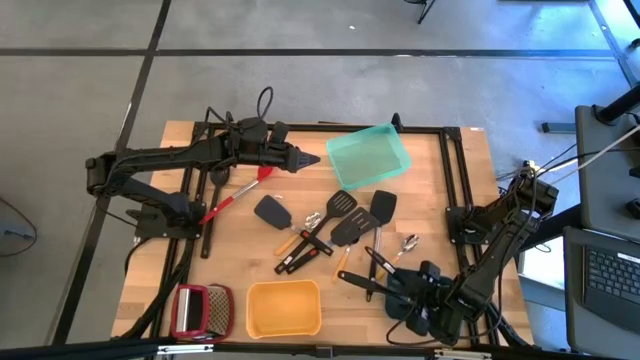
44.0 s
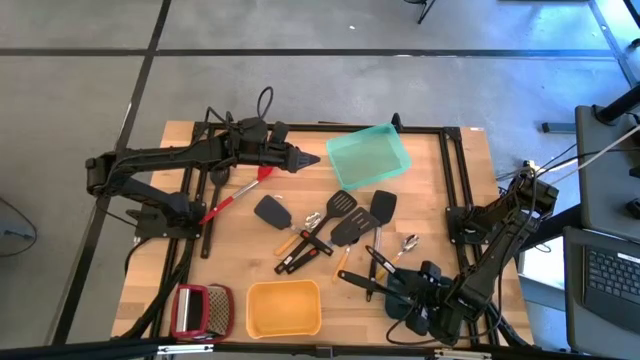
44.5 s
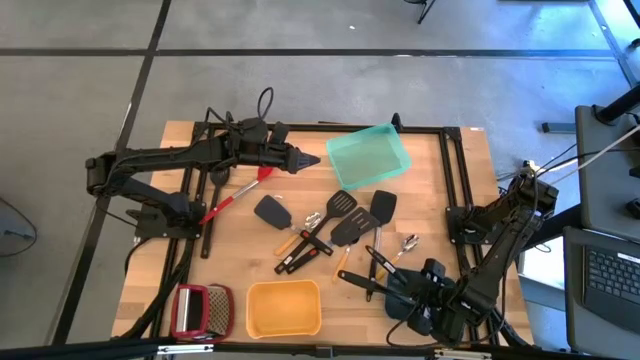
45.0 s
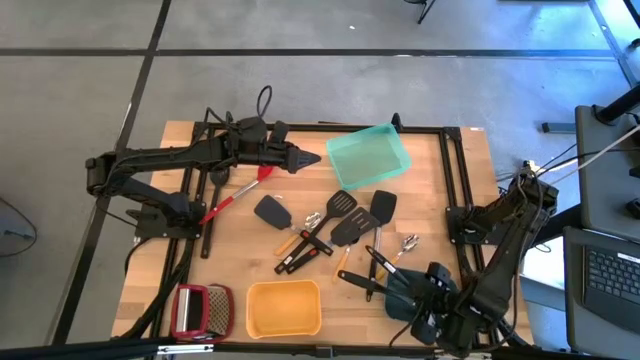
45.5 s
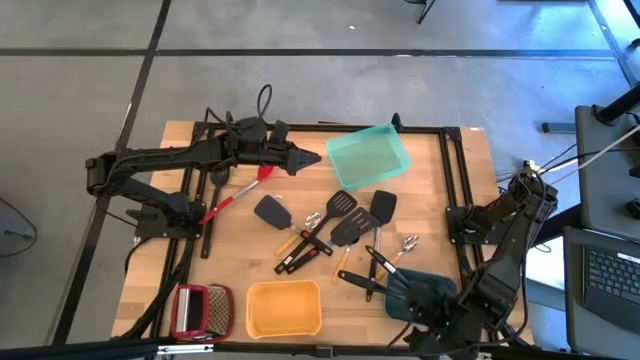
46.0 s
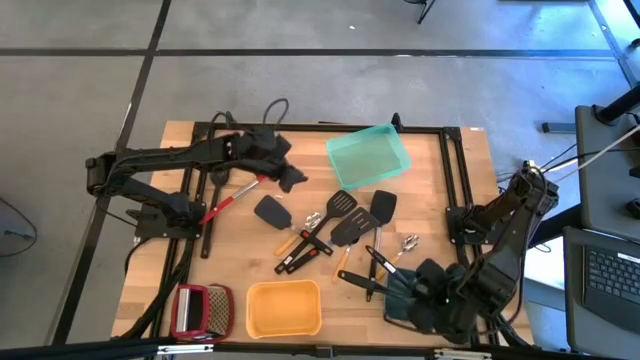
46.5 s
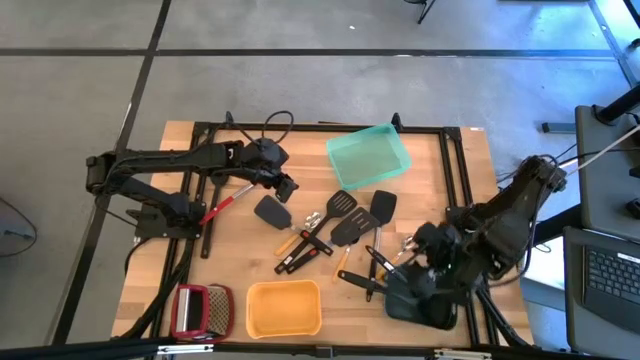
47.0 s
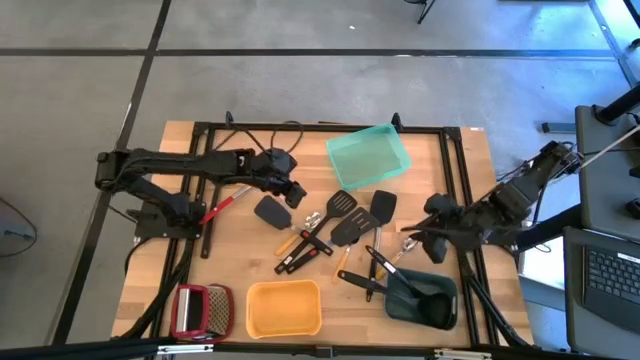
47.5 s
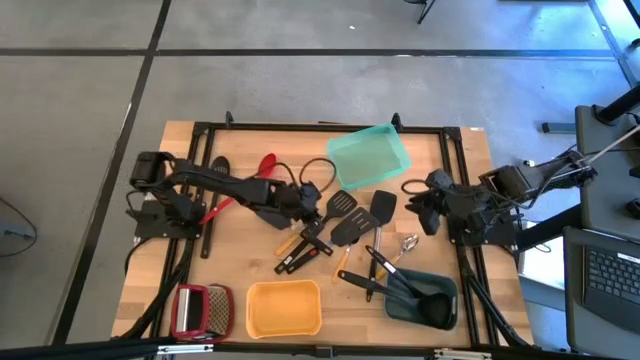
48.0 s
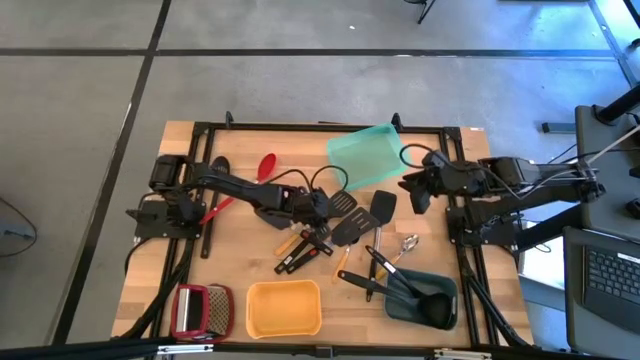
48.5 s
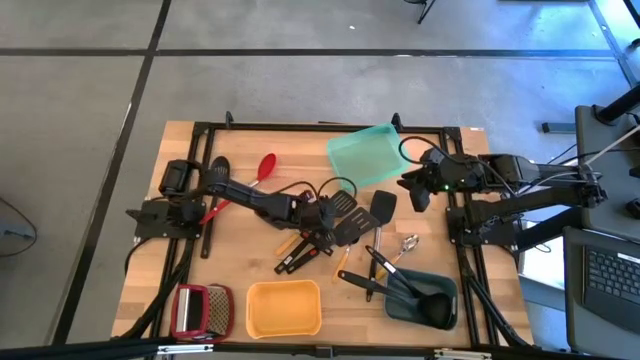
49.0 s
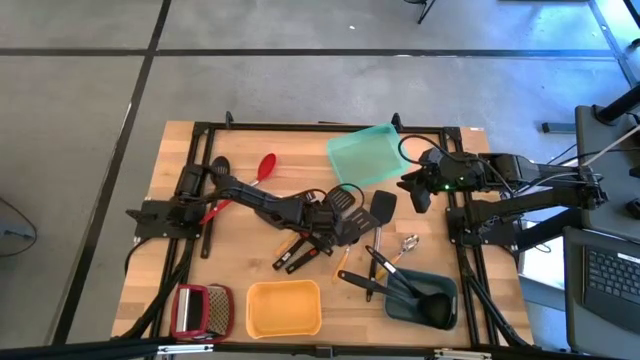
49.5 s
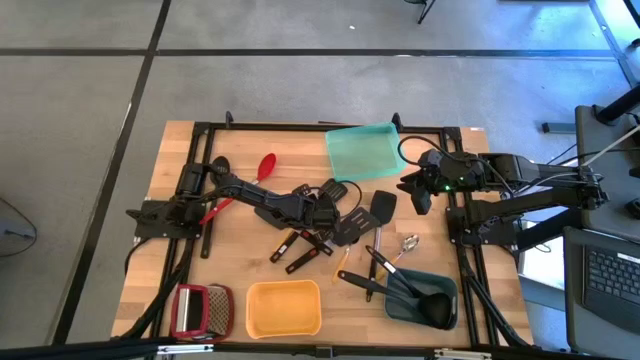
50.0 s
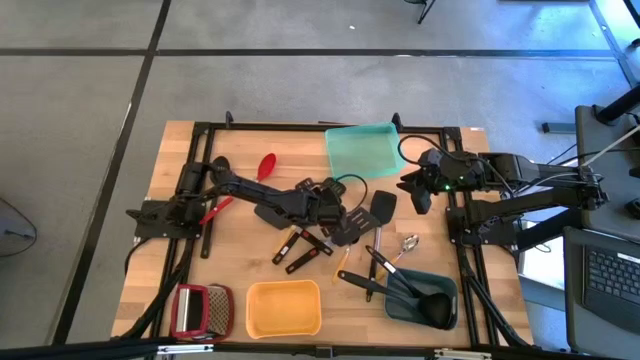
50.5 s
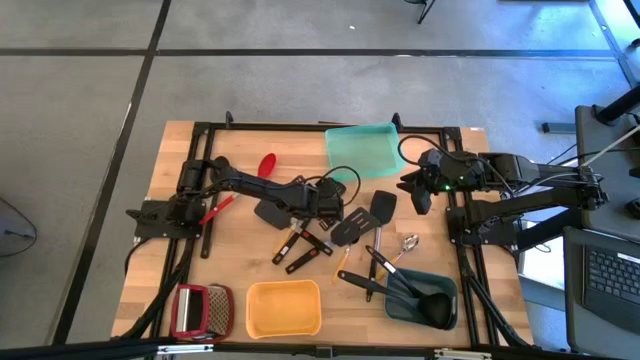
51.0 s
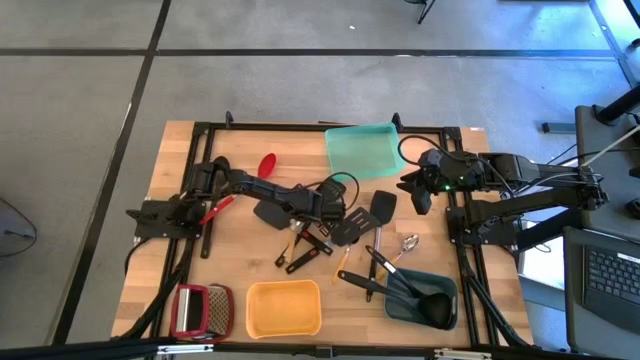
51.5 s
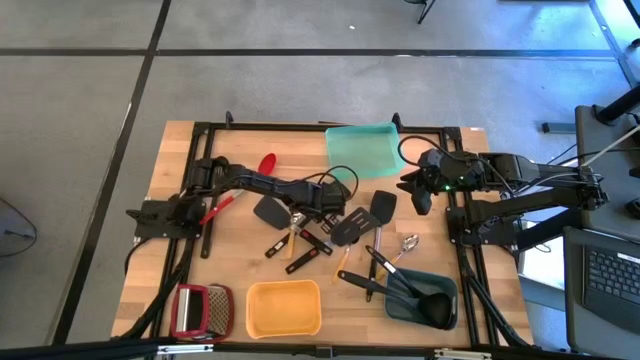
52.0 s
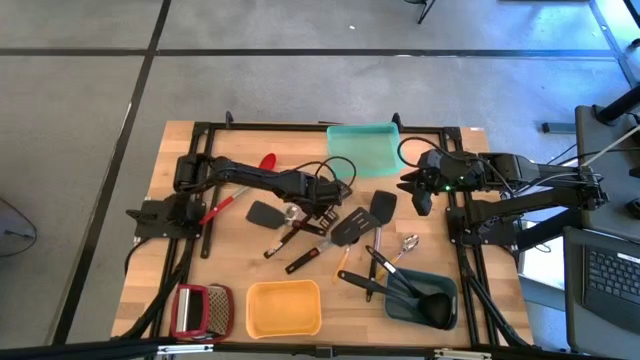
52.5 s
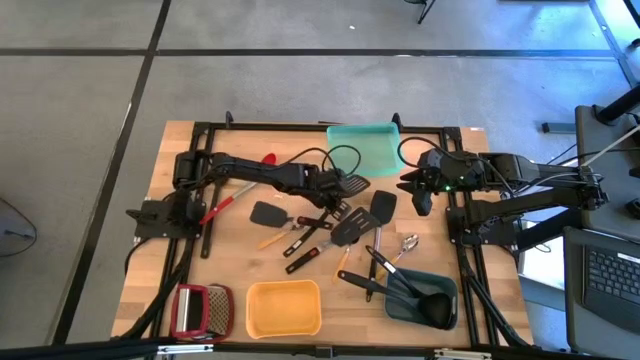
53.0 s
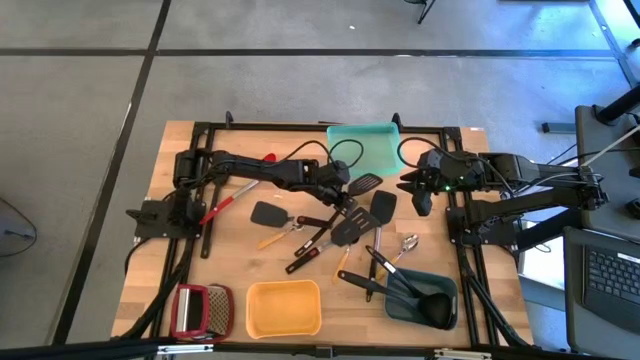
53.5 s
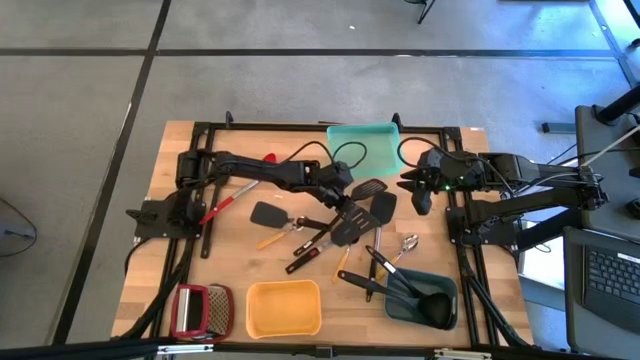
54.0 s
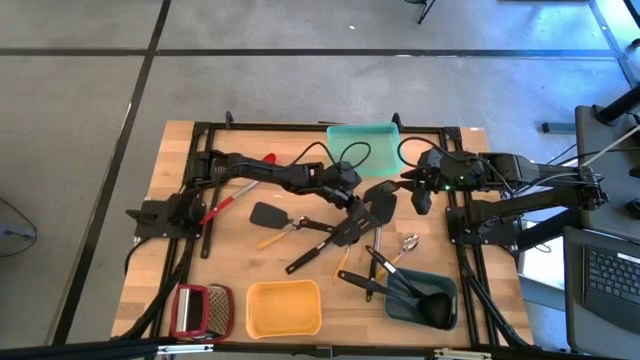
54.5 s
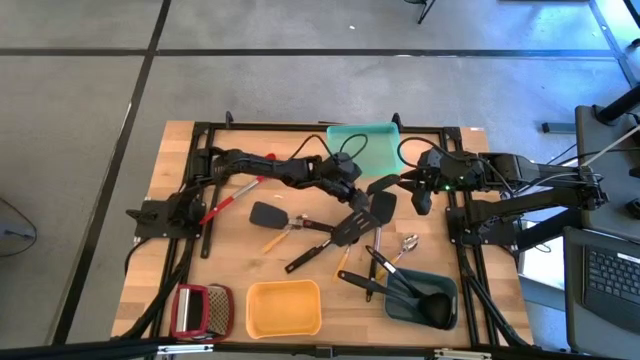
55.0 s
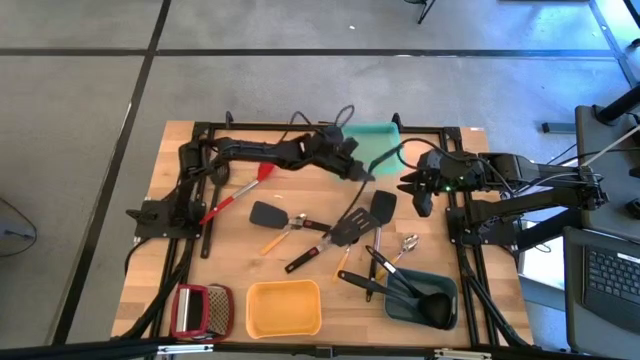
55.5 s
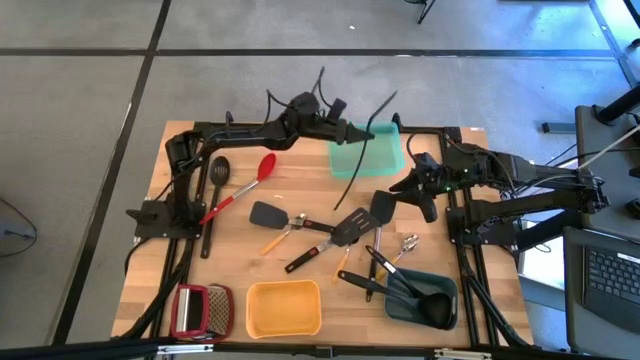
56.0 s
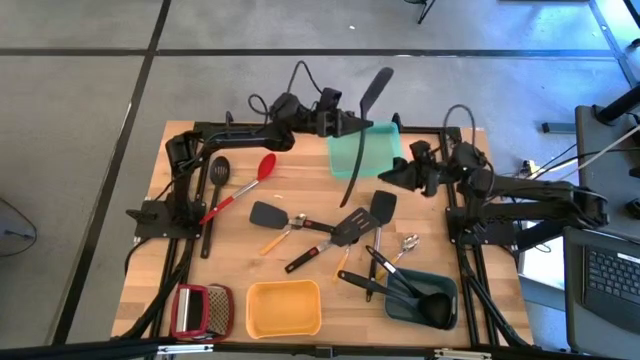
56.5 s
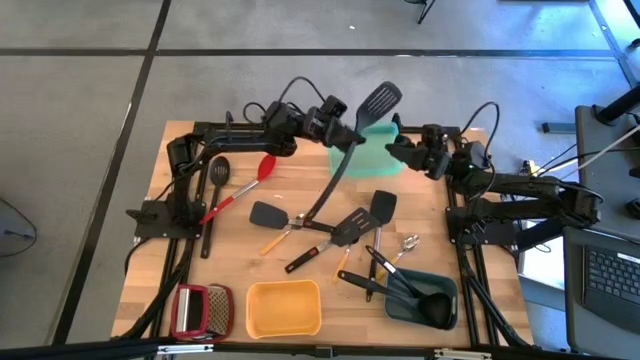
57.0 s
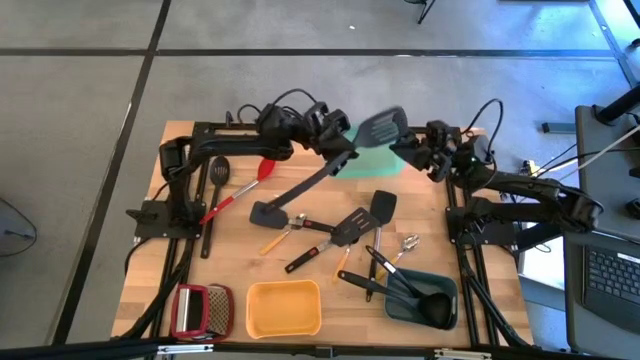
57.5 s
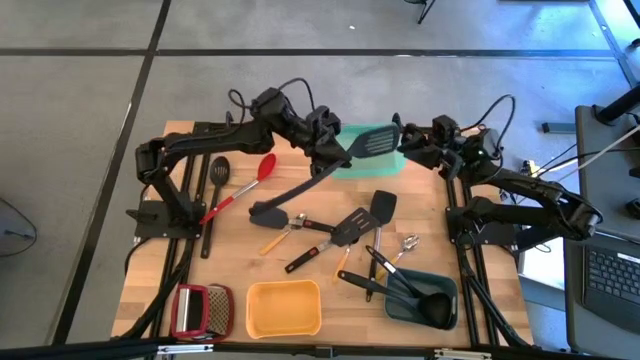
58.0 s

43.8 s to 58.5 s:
Task: Pick & Place Kitchen Items
Put the black spatula into the green bin

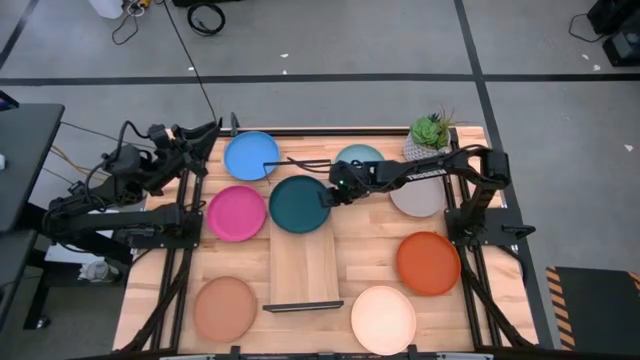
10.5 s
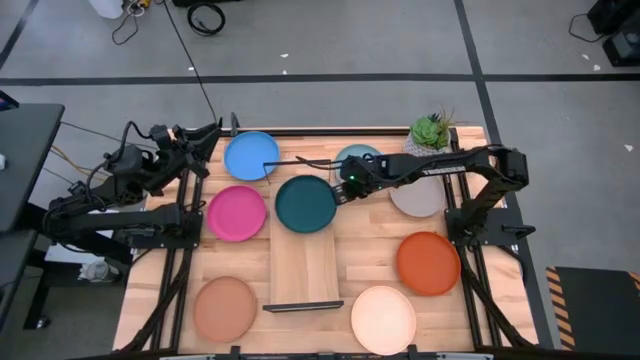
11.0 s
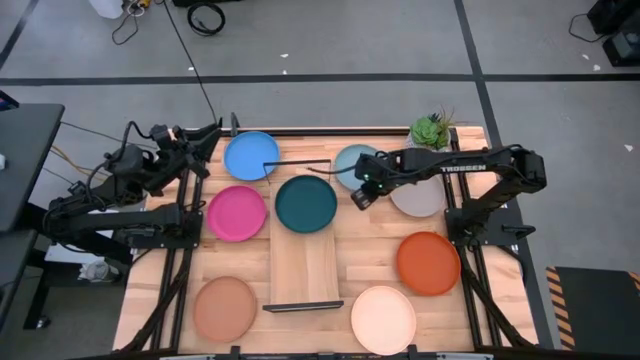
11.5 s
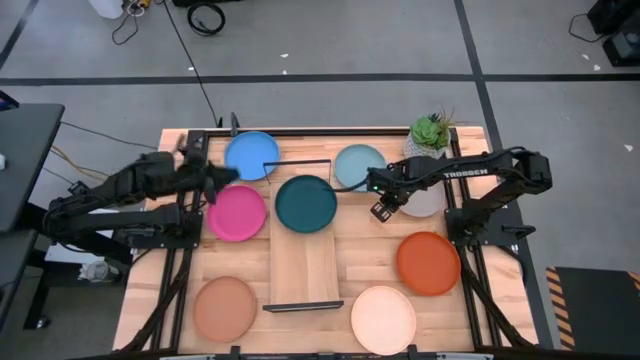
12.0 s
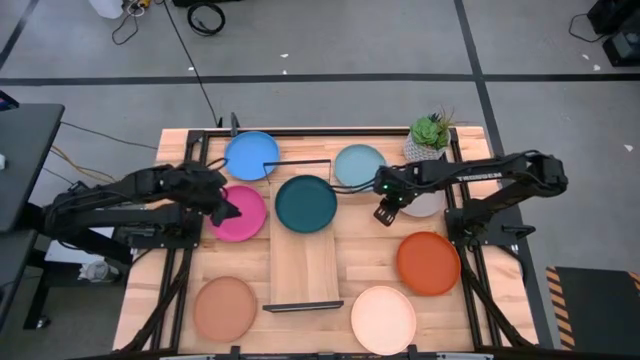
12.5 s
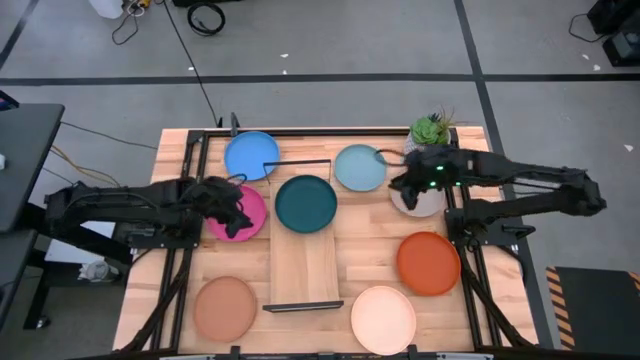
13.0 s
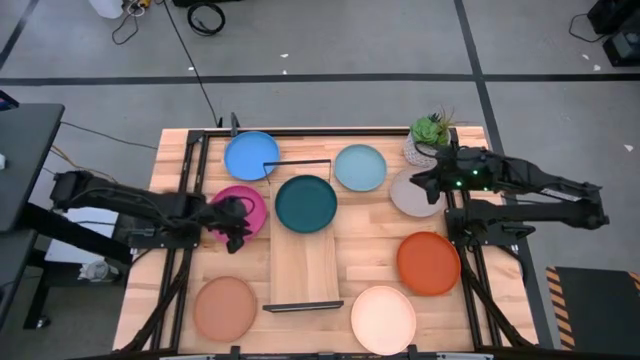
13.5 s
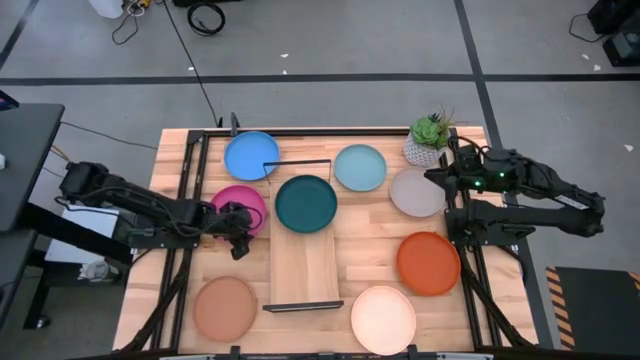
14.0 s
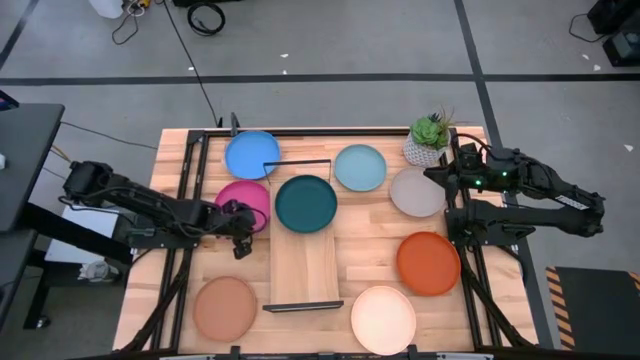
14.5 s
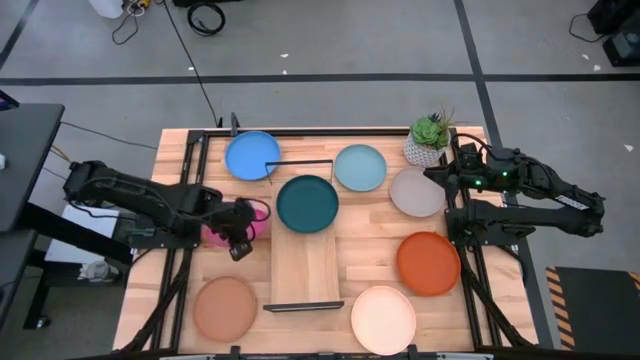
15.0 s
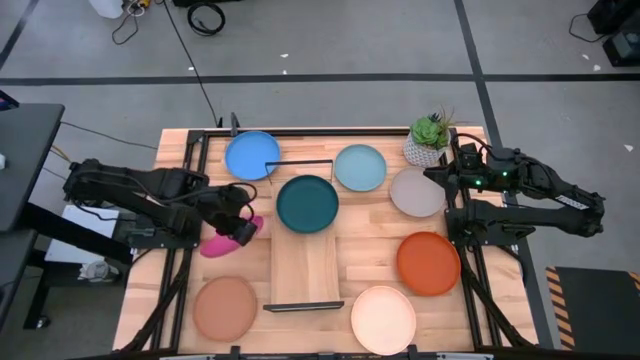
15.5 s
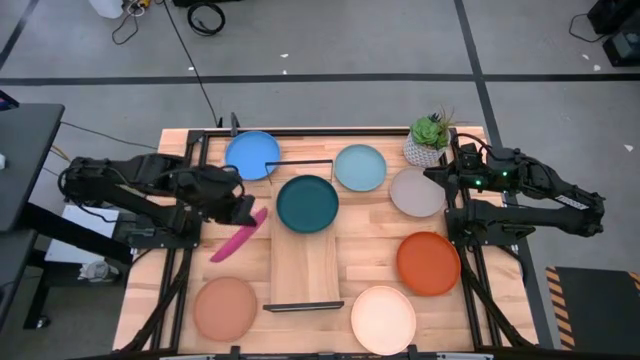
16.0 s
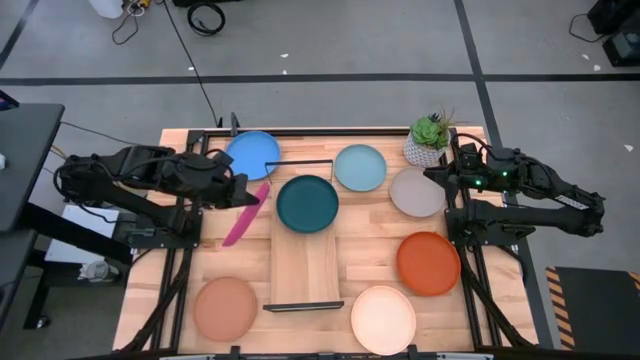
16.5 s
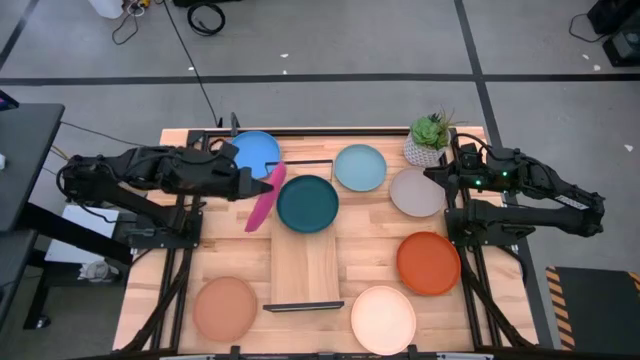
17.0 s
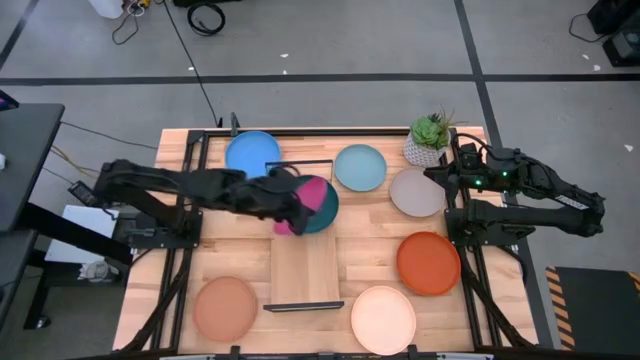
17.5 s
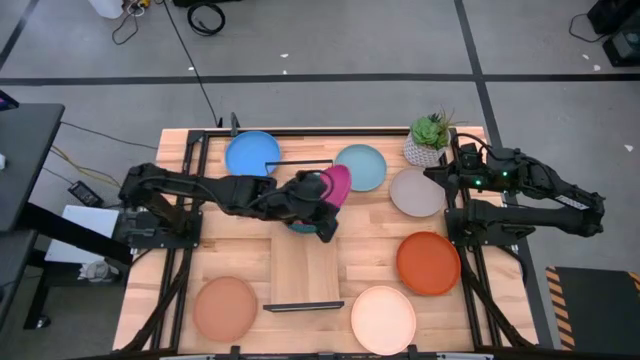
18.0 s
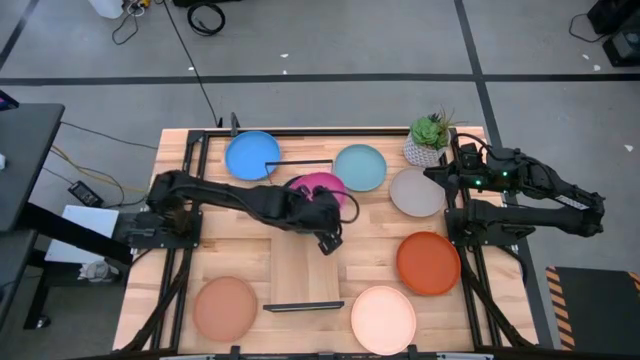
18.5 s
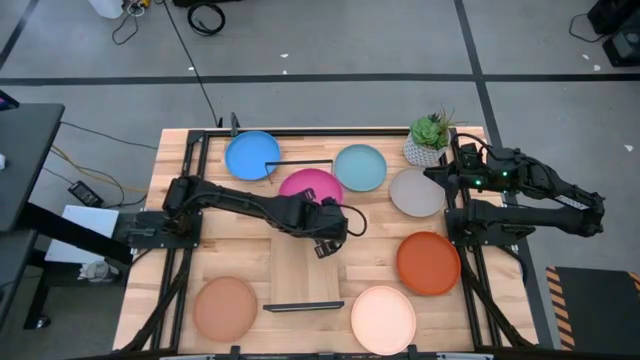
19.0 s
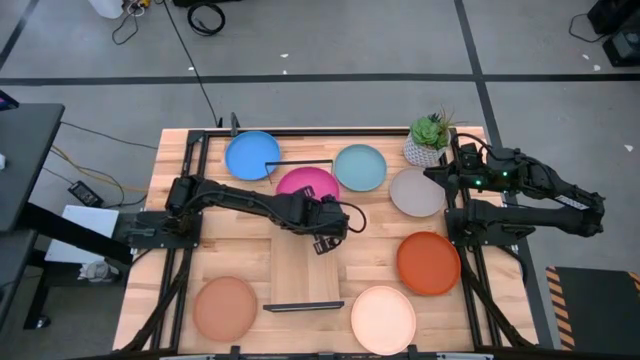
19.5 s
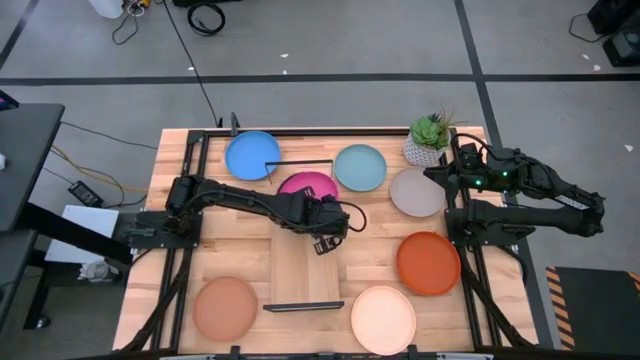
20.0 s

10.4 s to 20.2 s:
Task: Place and stack plates onto a shelf
Stack the pink plate on the dark blue plate on the shelf
